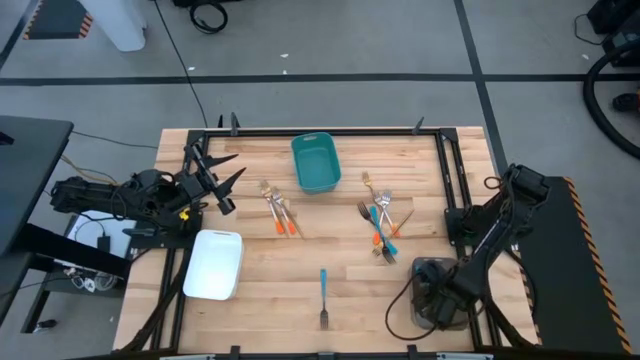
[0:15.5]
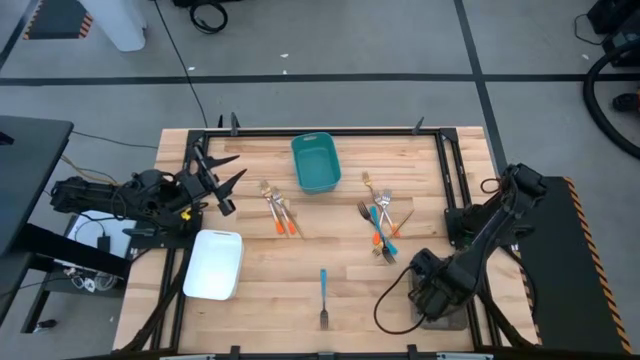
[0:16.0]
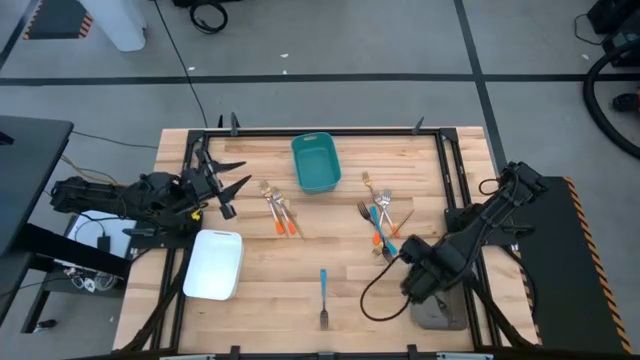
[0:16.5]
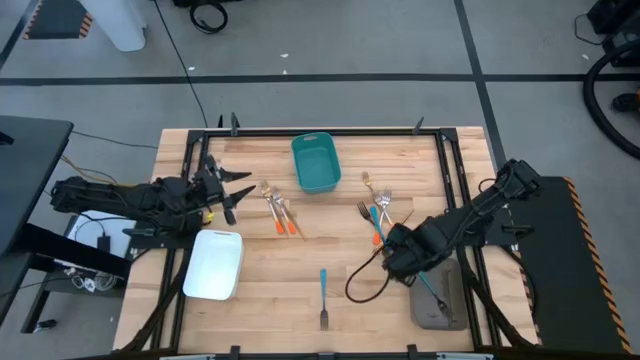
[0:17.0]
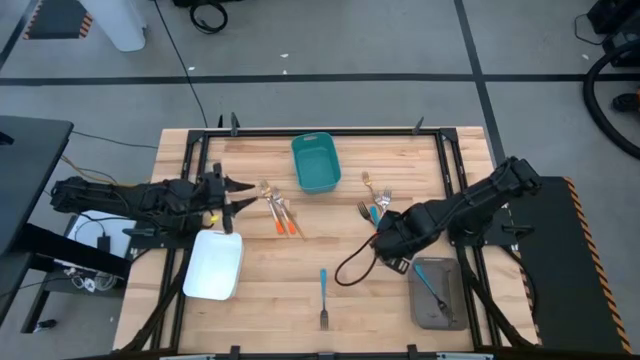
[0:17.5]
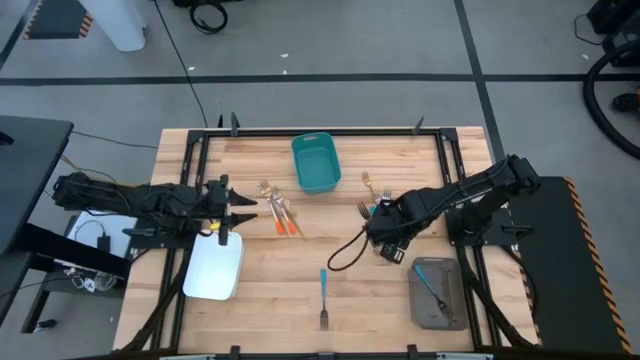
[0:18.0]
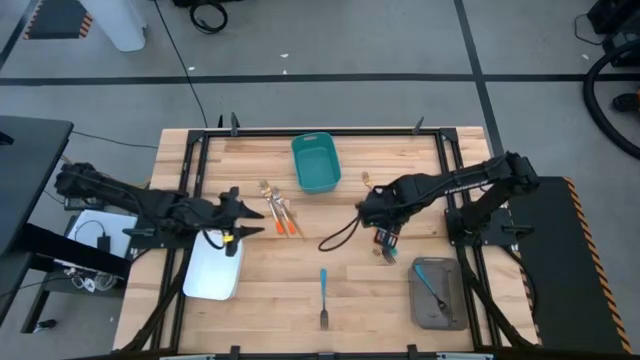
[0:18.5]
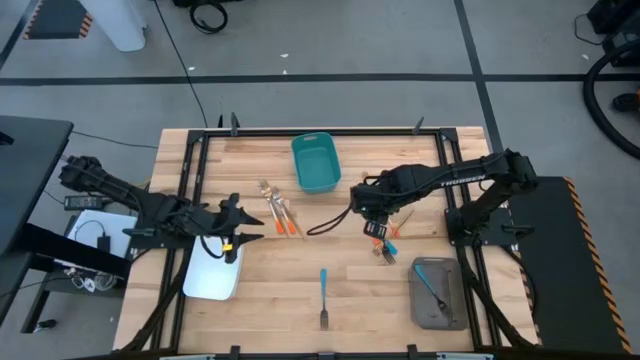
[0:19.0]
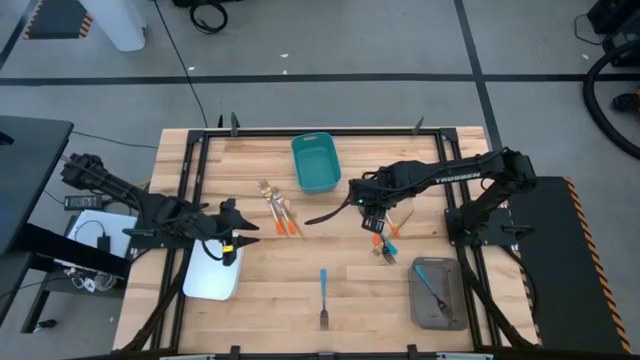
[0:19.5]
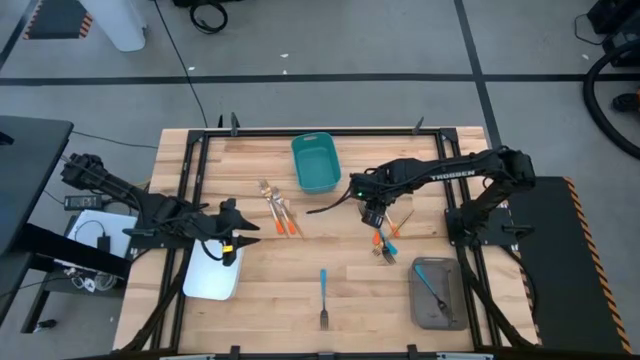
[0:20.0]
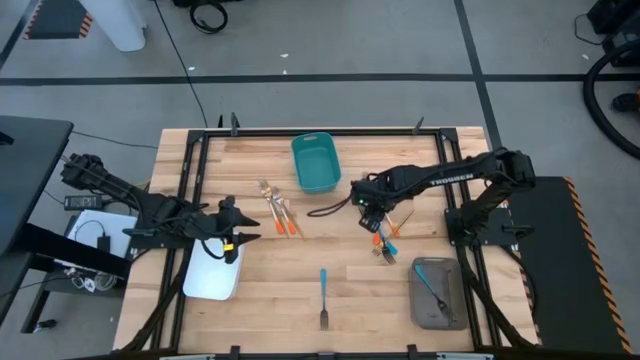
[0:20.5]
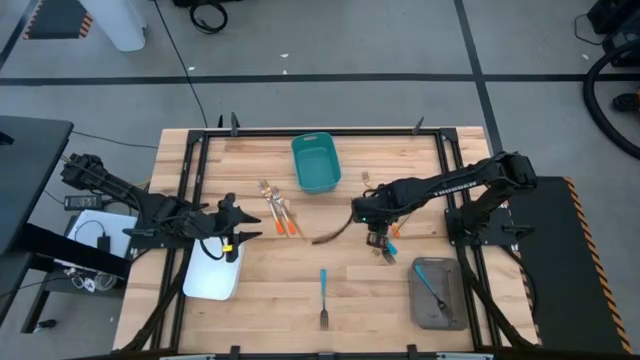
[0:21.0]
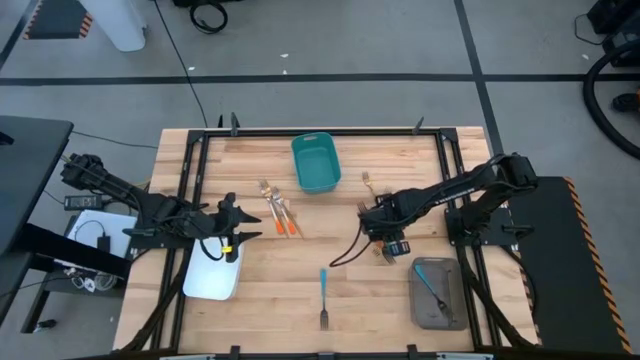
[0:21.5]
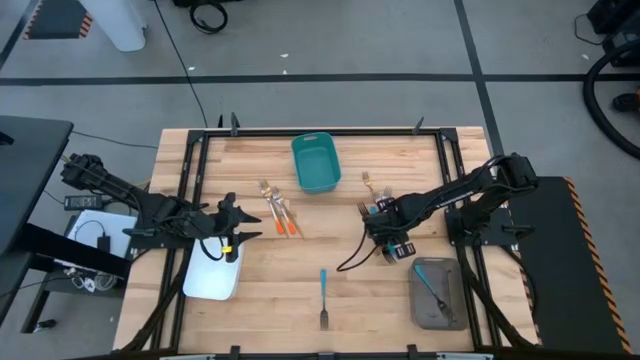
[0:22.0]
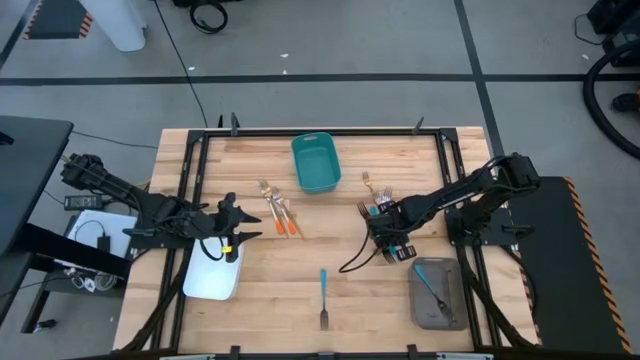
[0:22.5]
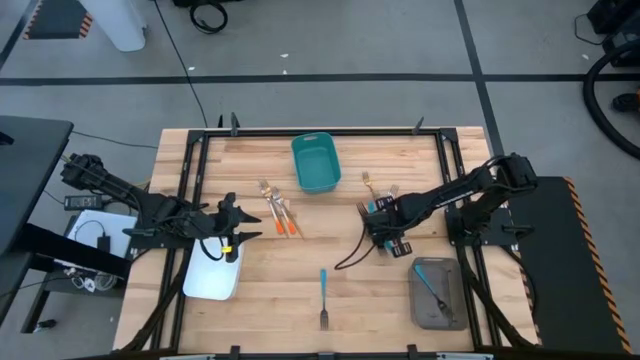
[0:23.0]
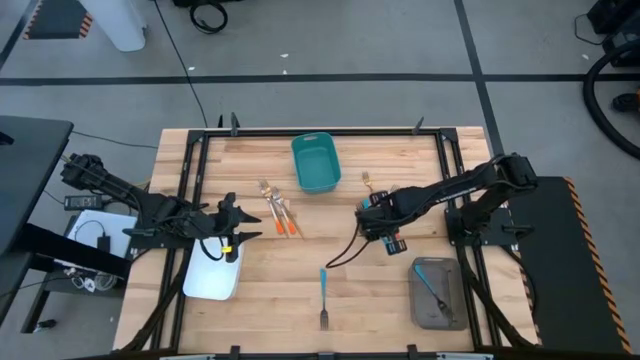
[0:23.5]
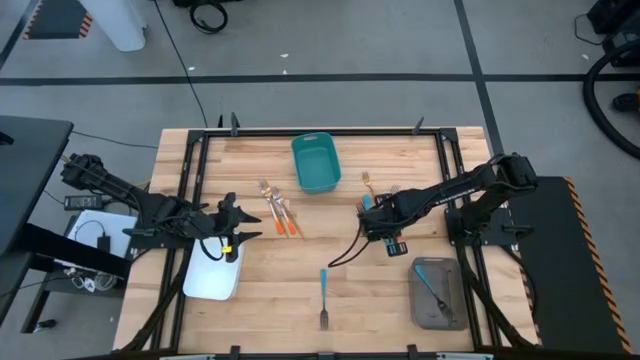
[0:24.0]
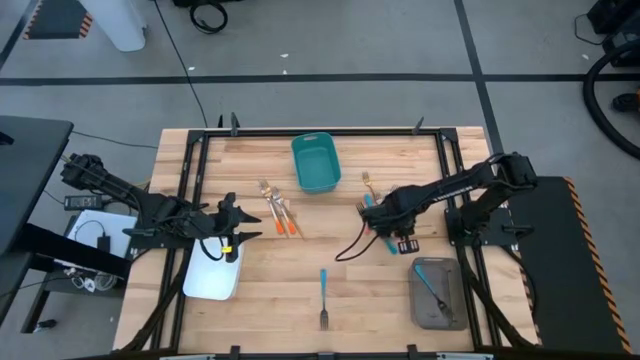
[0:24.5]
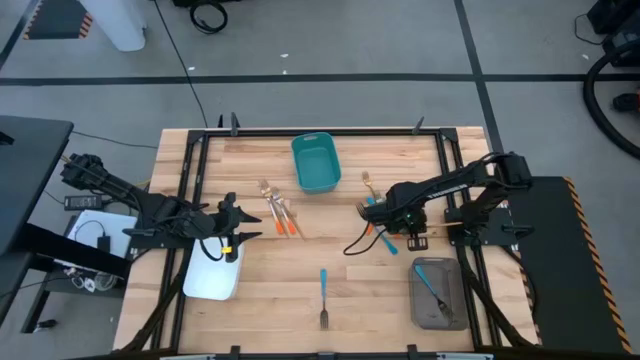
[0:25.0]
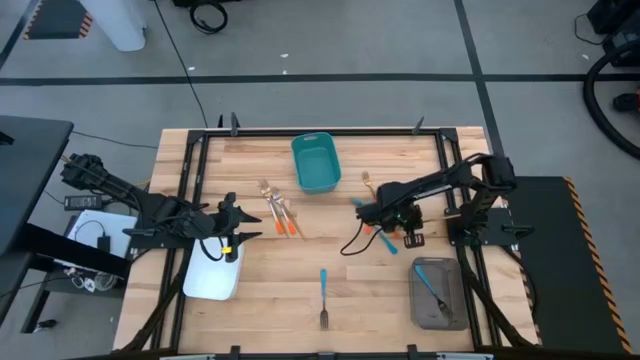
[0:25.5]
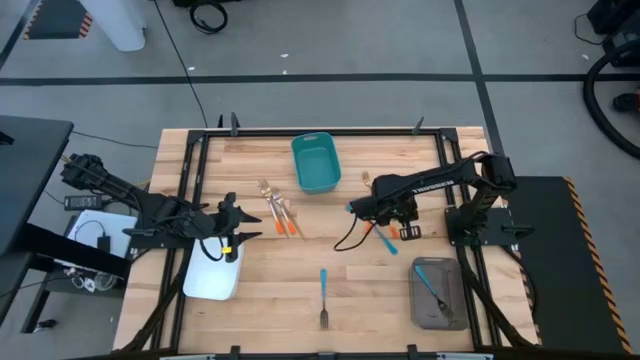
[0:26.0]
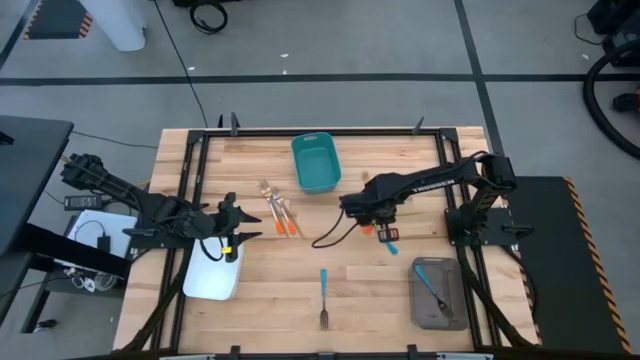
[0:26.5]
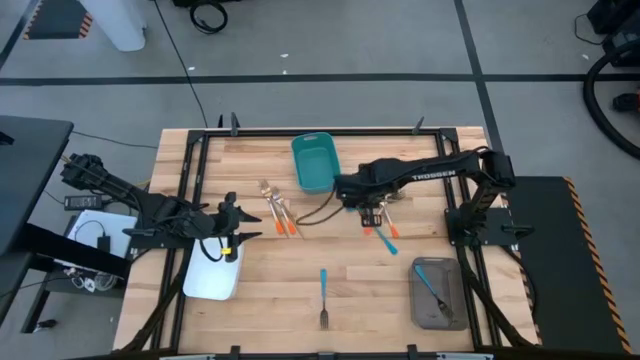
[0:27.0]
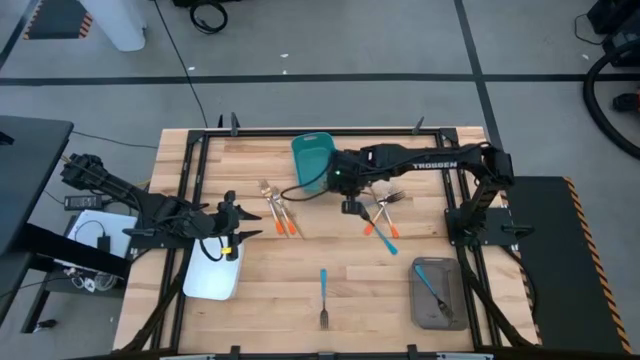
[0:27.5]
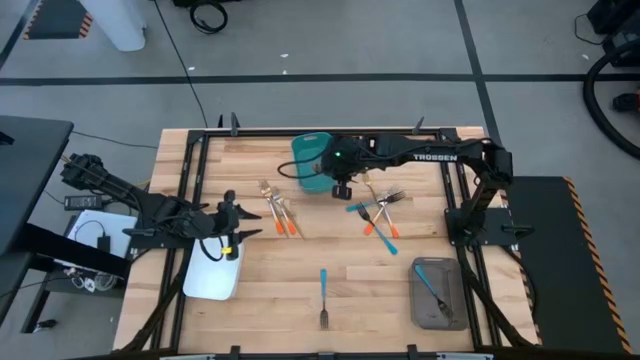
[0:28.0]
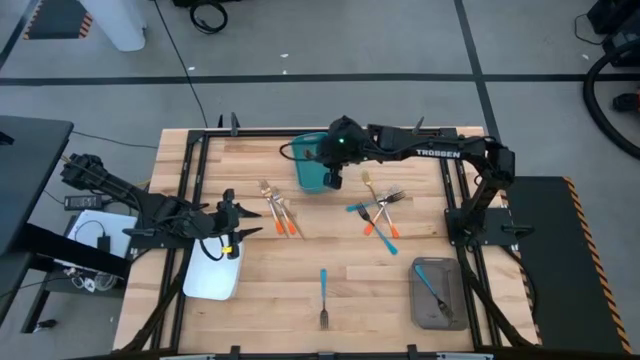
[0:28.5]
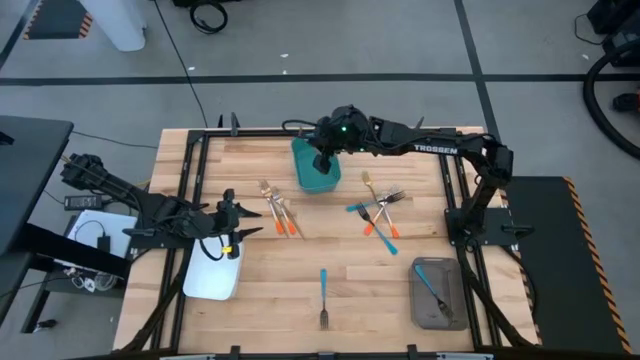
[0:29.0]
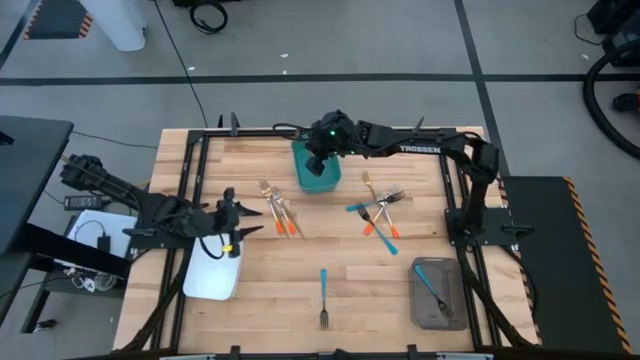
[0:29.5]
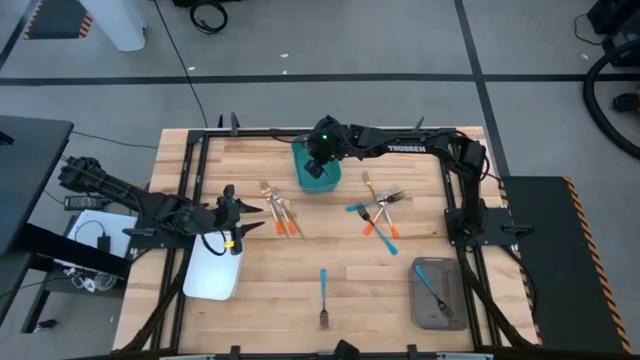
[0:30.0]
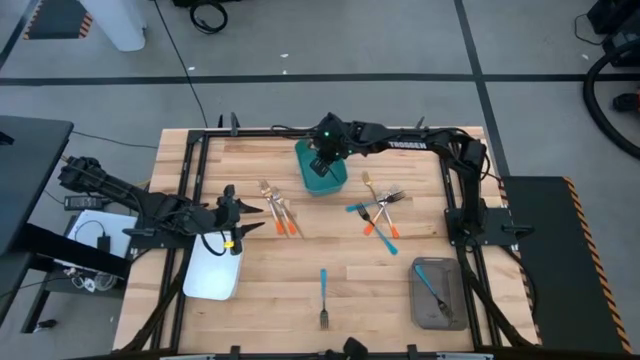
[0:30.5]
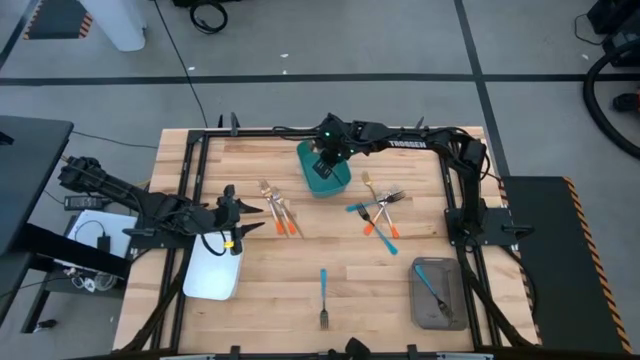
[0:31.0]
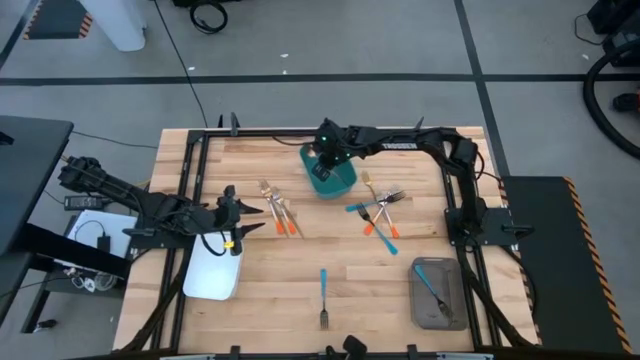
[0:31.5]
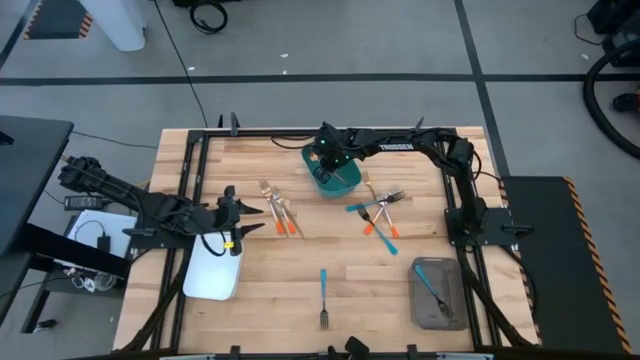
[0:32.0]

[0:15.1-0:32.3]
Task: Sort silverware by color (type)
Put the gold fork into the green bin
